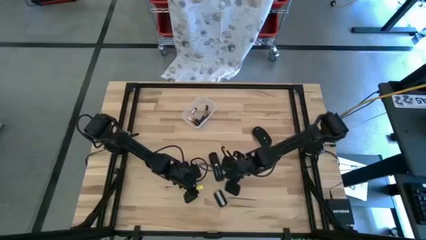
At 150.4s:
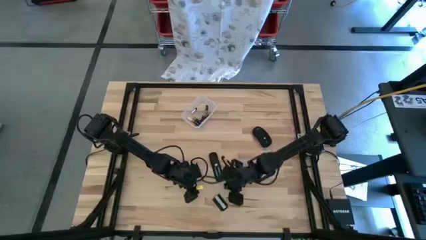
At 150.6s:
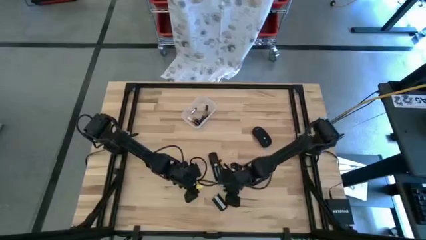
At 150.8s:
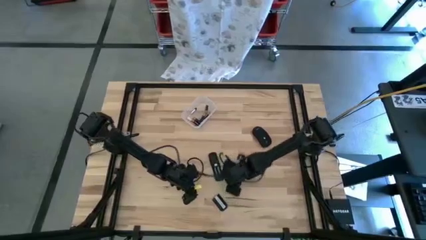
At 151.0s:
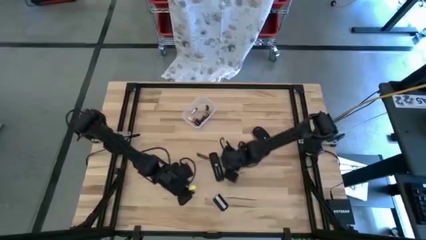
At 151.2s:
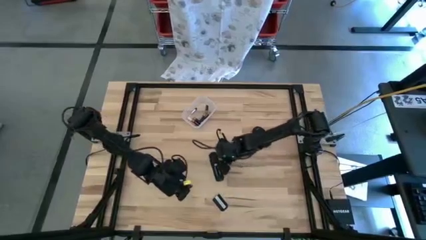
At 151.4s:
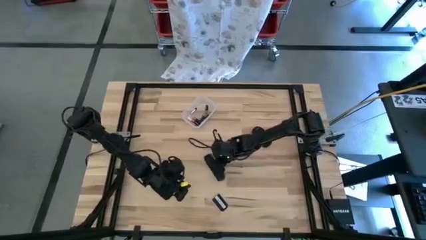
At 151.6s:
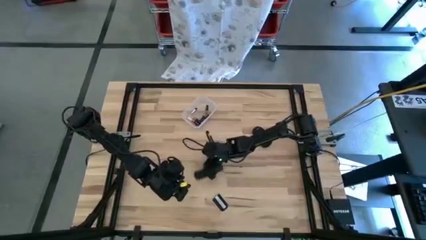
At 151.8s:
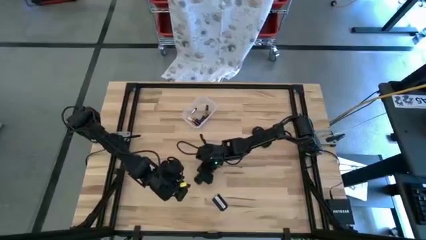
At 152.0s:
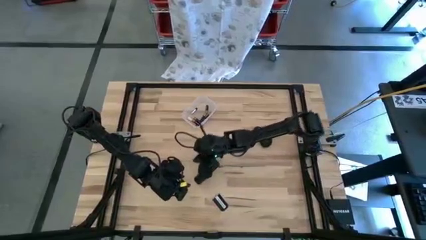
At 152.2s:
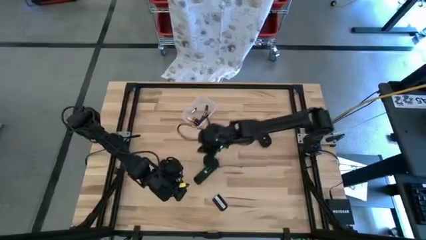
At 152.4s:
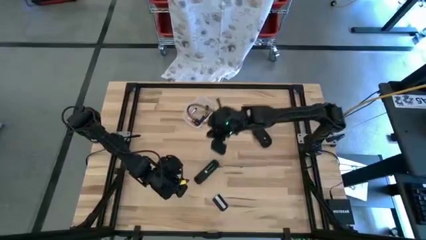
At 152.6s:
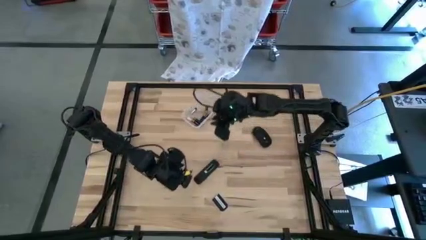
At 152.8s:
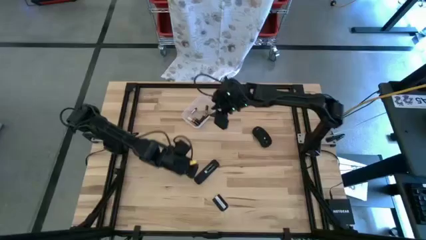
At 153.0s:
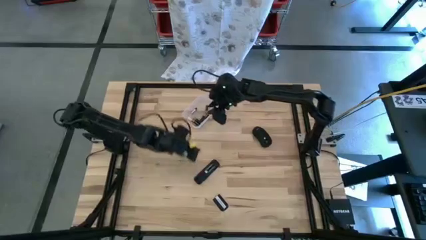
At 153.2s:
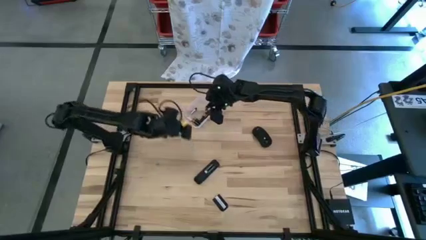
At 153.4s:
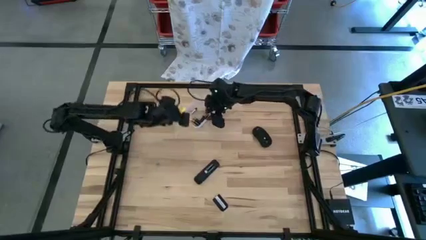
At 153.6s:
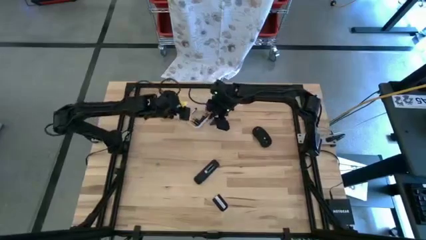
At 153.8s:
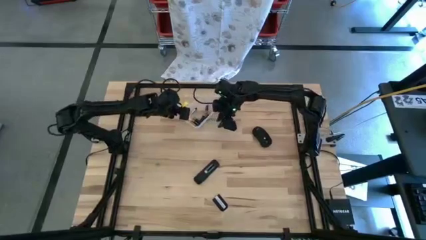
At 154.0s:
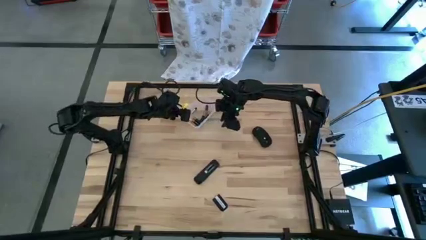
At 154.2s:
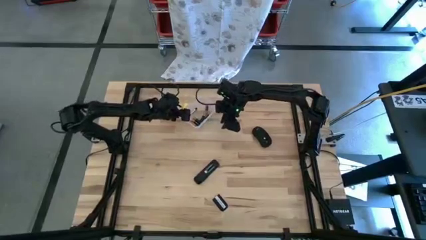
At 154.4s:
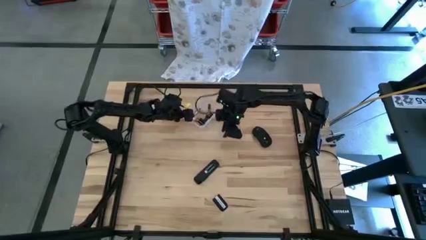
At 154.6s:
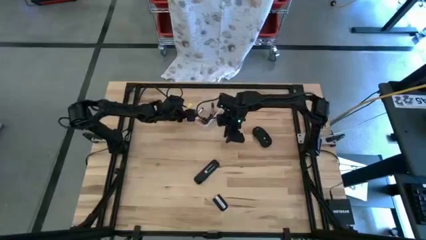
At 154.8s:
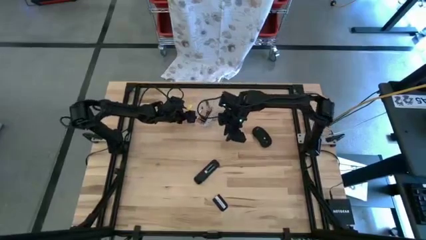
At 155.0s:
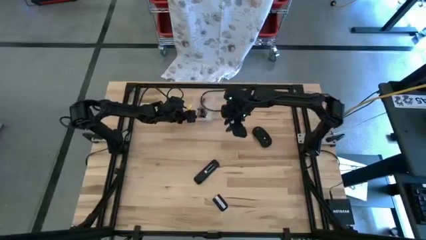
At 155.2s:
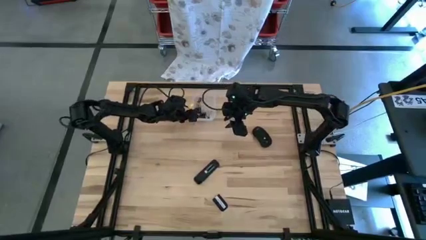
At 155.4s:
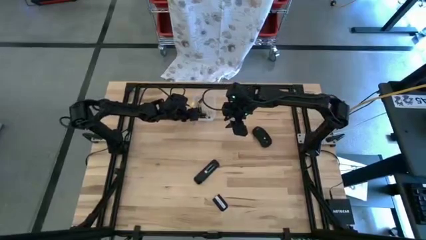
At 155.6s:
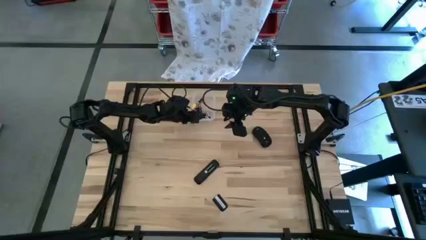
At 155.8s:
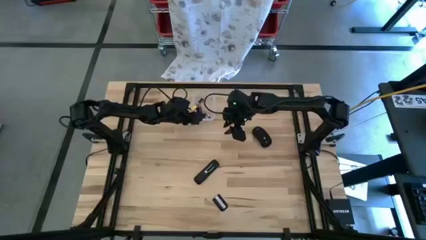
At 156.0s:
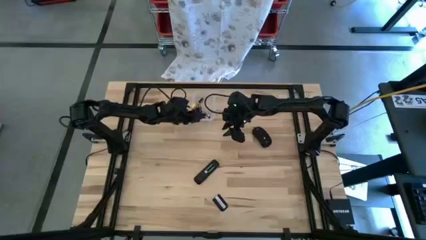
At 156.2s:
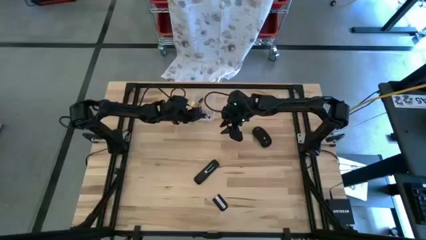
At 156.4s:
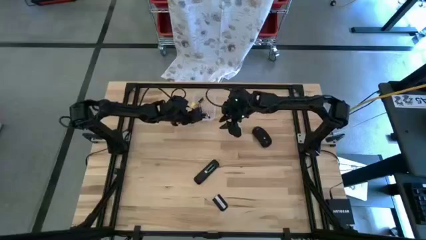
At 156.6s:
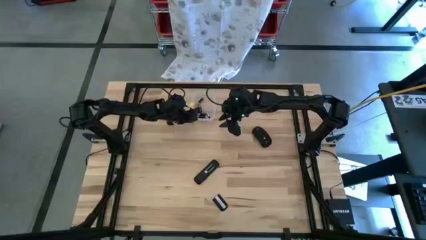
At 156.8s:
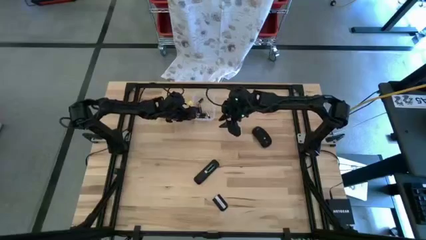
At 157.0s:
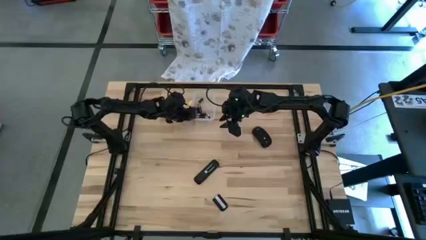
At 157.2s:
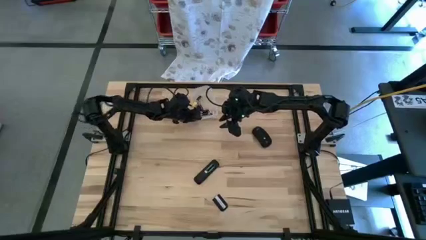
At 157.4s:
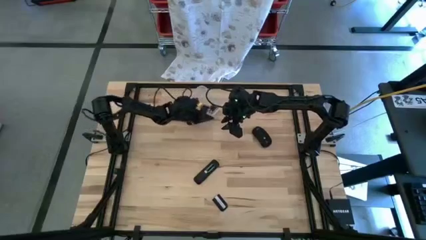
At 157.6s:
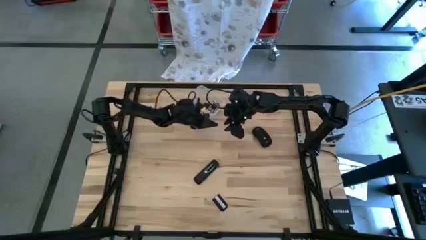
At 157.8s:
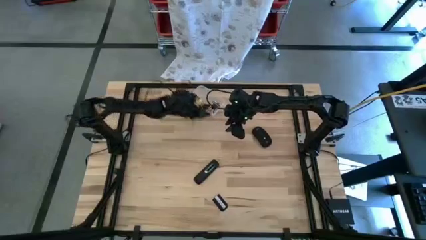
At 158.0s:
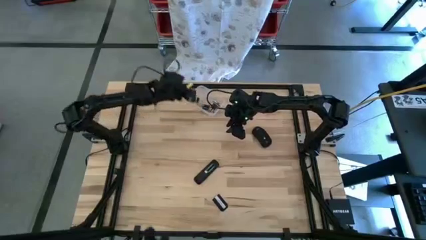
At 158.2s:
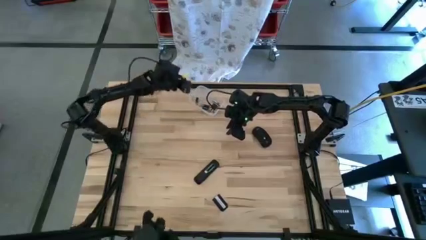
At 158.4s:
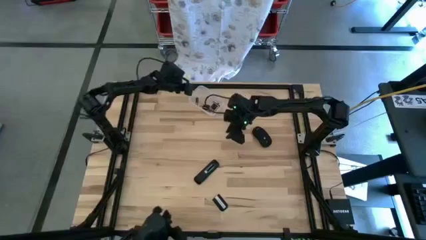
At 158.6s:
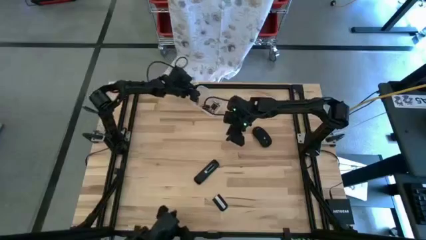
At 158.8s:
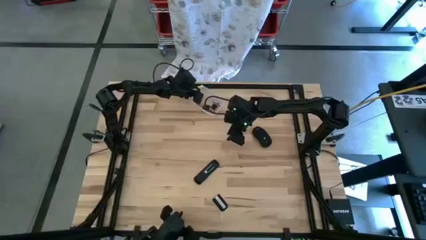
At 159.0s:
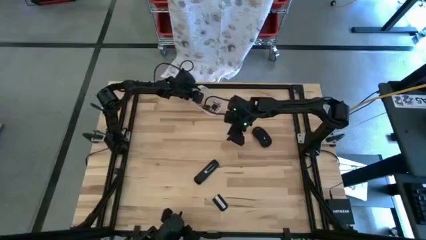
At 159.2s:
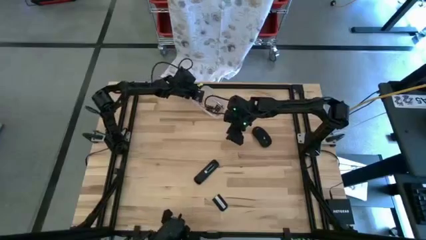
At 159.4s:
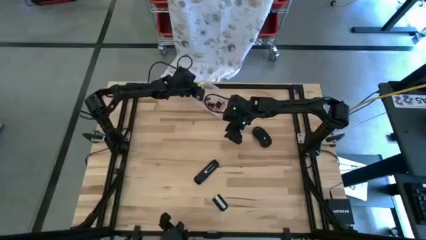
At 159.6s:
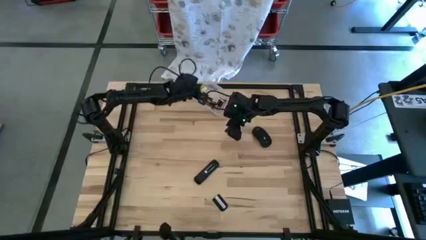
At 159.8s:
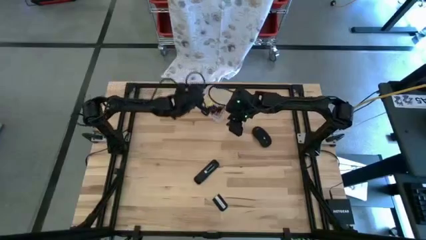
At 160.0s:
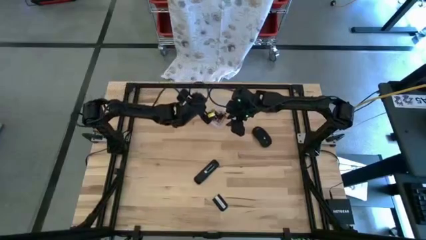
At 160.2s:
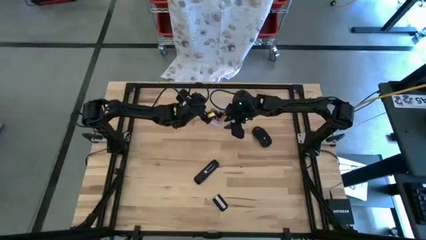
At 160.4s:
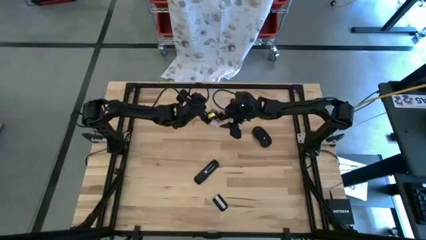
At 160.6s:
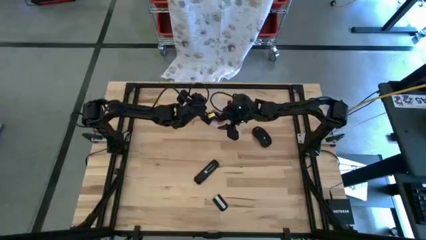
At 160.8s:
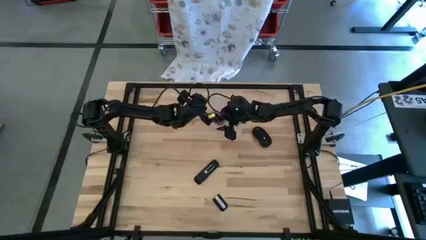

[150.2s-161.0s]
Task: Insert battery
Remove the silver battery from the transparent bin

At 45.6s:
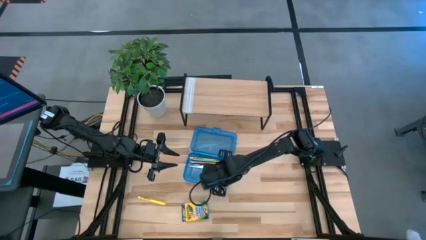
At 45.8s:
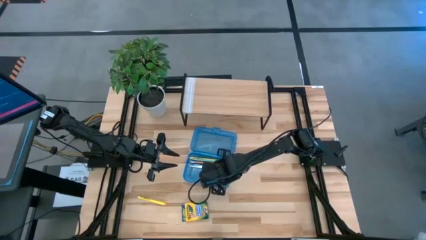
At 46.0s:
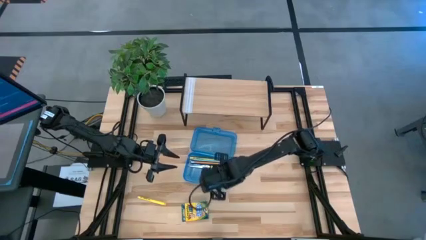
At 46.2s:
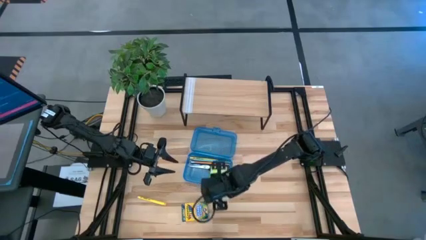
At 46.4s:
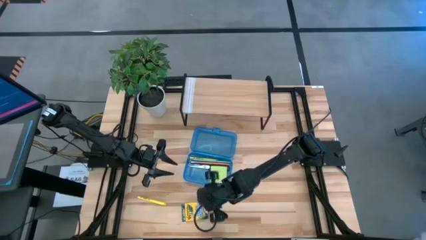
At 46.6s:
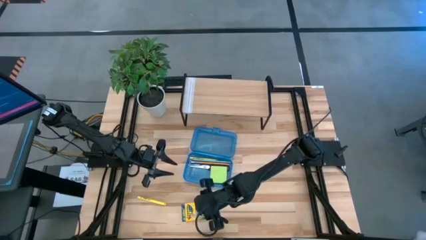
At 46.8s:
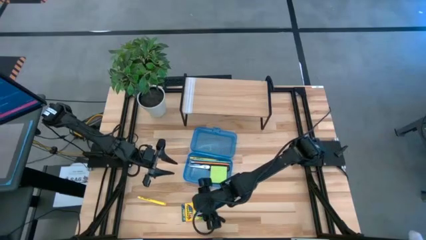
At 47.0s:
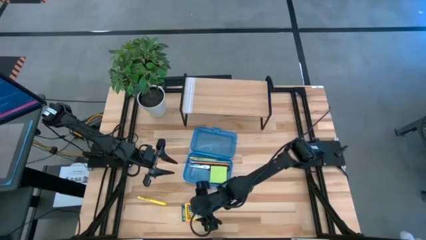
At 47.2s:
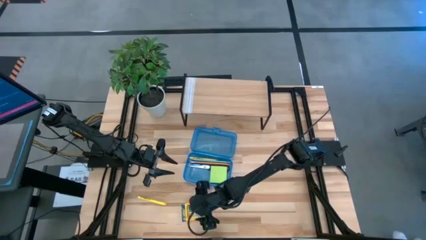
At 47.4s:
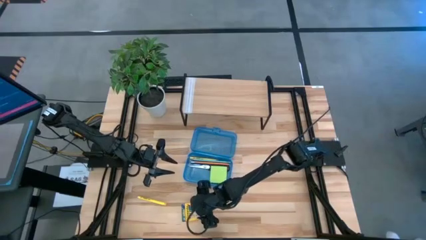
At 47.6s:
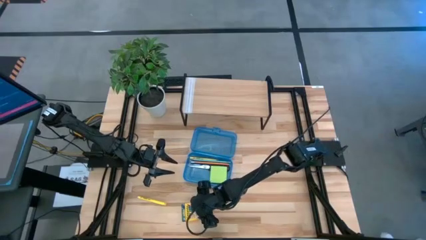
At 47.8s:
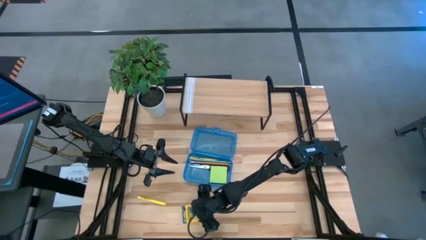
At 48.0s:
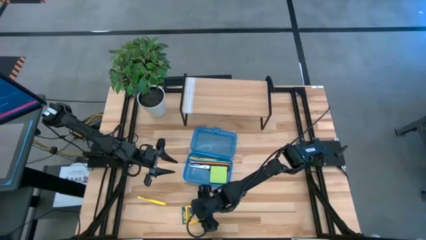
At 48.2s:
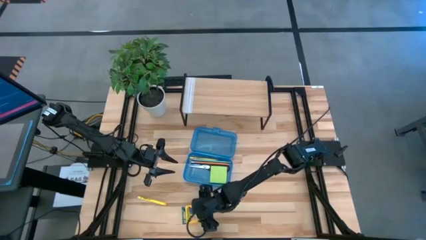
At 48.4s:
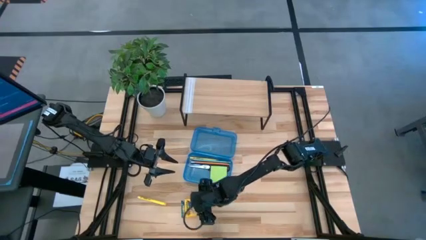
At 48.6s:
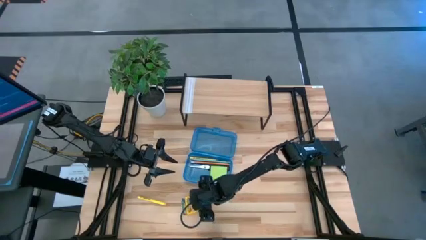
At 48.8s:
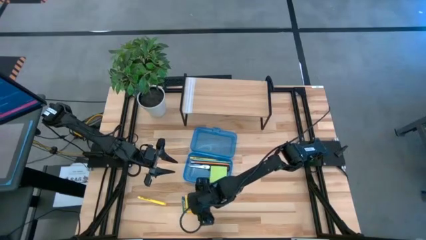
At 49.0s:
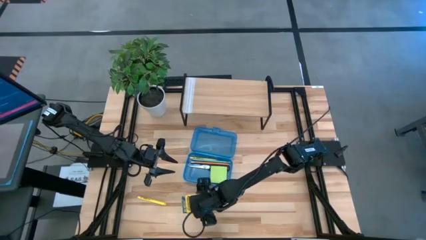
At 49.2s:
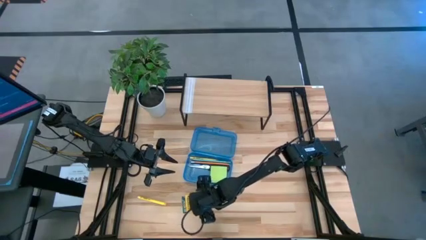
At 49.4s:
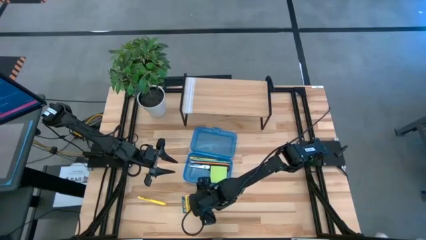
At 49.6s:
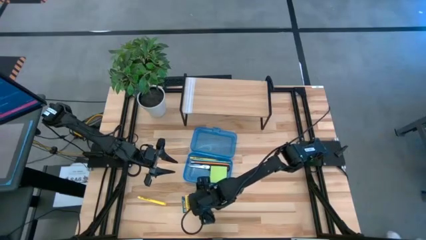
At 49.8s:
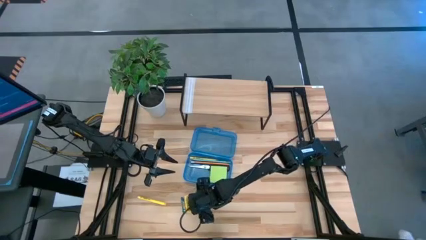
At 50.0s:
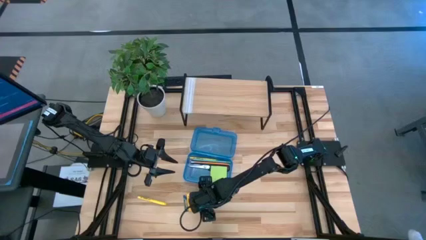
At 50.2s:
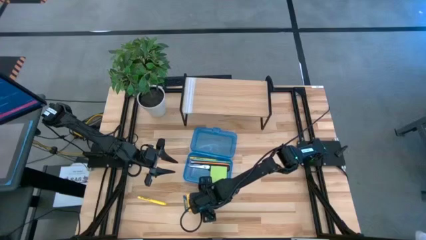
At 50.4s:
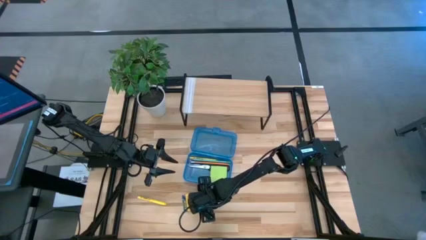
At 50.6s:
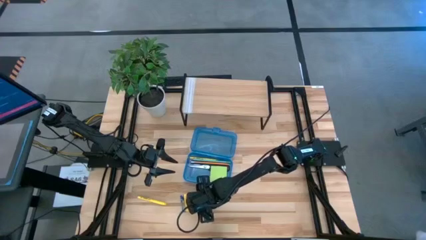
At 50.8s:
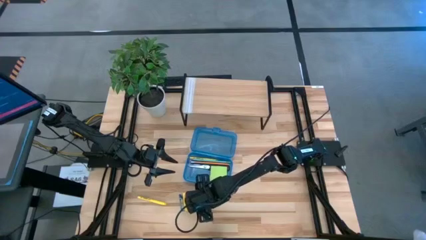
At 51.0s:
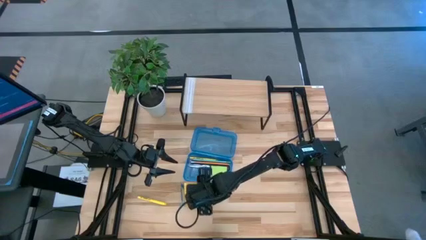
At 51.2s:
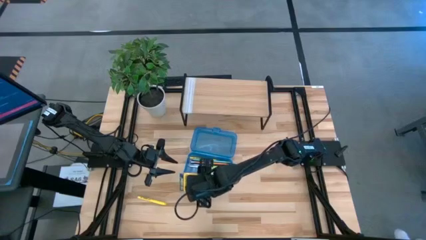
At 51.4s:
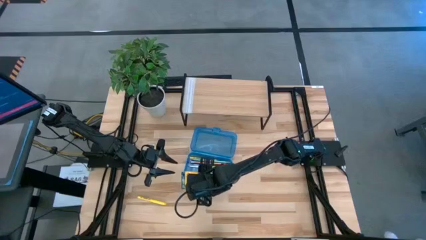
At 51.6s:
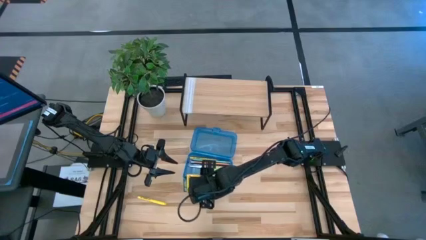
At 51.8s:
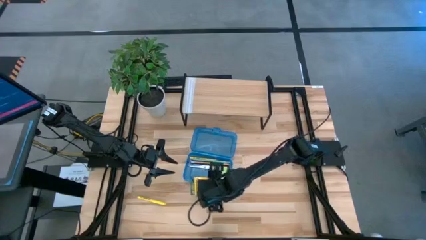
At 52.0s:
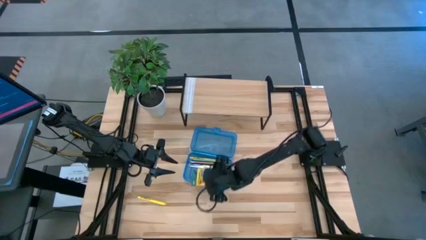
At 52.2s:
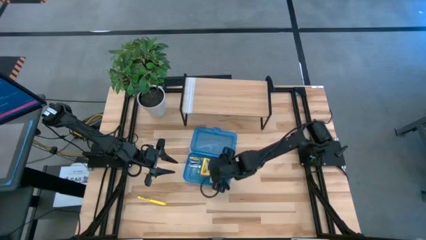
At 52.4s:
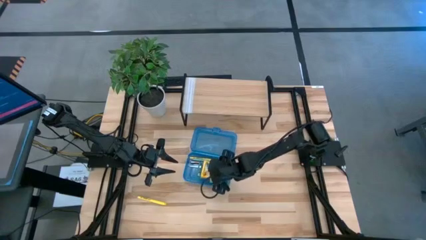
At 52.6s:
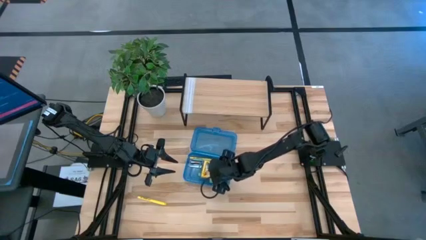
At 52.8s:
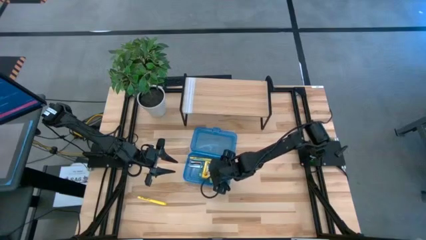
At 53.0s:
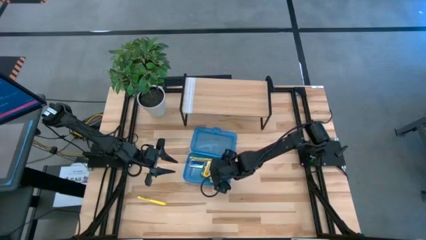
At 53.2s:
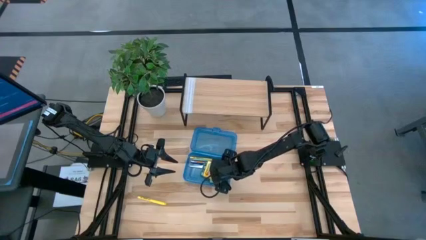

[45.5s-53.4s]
Task: Pack school essentials
Put the yellow crayon box into the blue supply box
